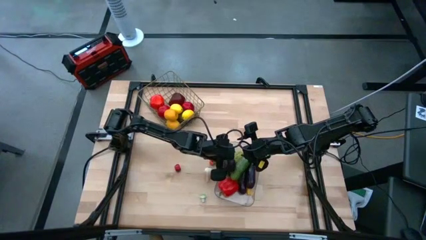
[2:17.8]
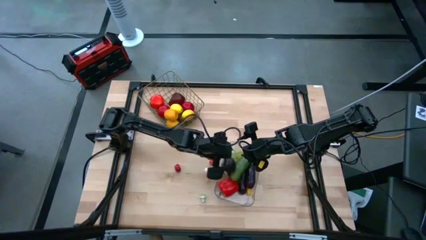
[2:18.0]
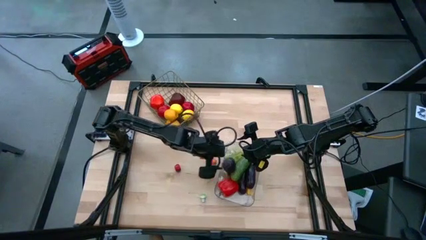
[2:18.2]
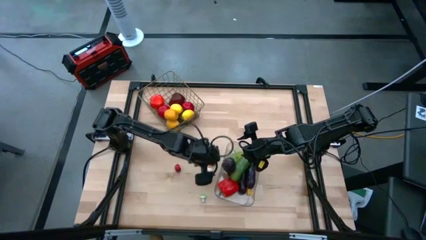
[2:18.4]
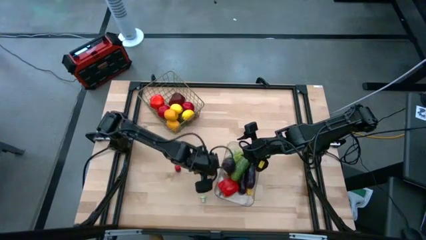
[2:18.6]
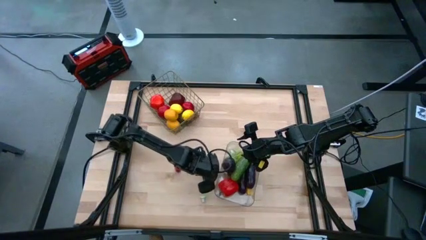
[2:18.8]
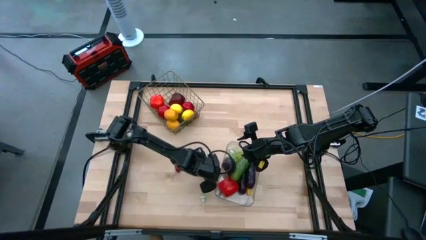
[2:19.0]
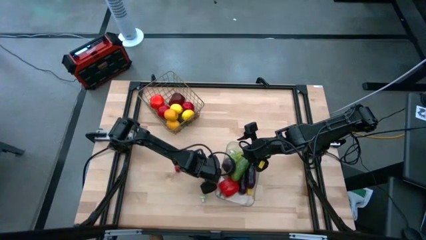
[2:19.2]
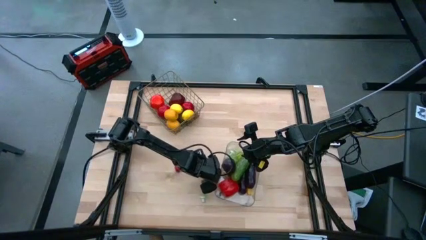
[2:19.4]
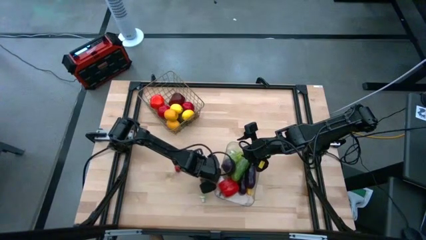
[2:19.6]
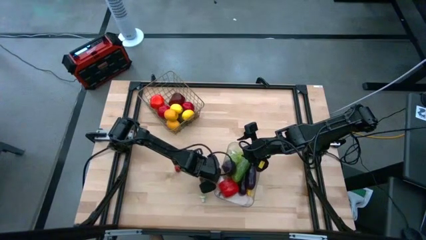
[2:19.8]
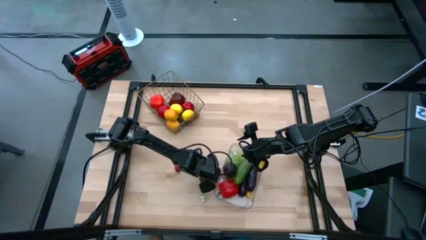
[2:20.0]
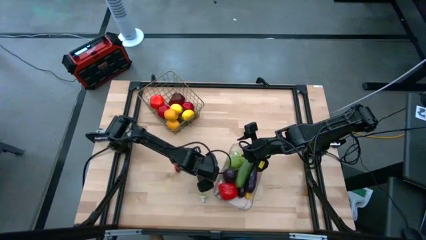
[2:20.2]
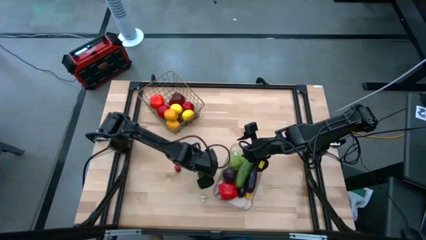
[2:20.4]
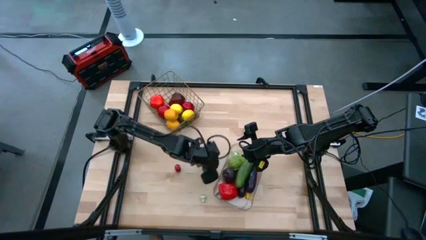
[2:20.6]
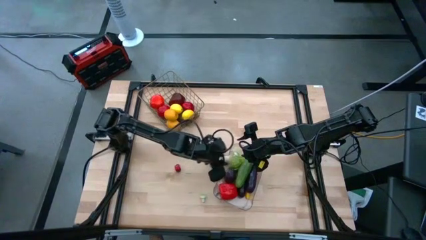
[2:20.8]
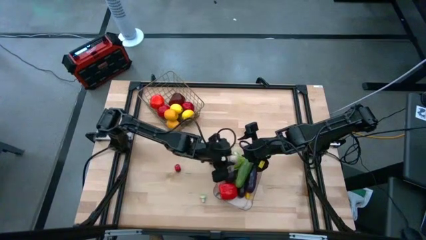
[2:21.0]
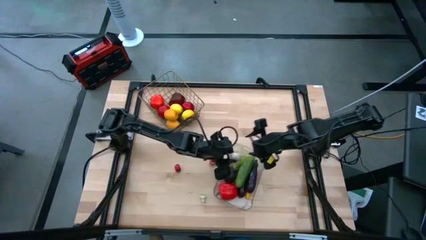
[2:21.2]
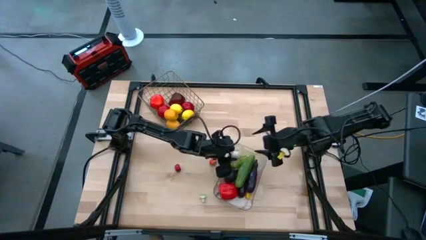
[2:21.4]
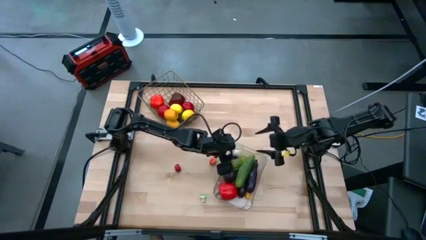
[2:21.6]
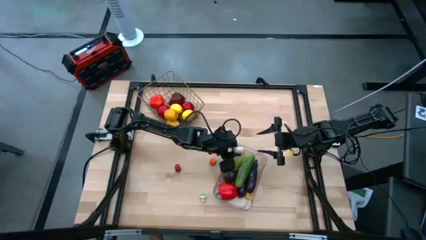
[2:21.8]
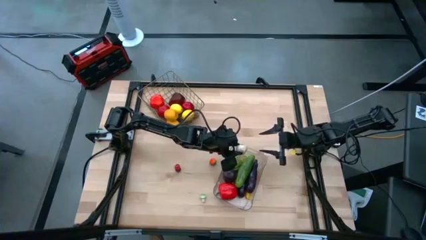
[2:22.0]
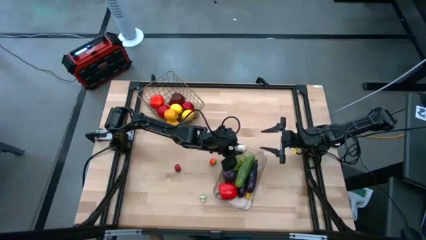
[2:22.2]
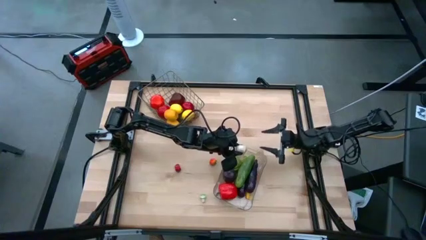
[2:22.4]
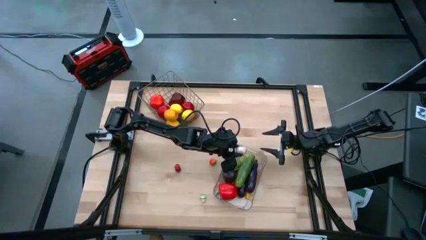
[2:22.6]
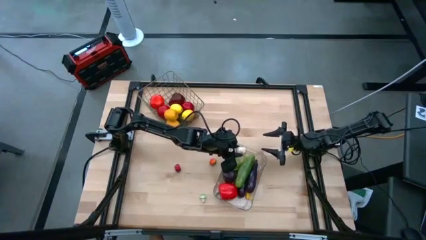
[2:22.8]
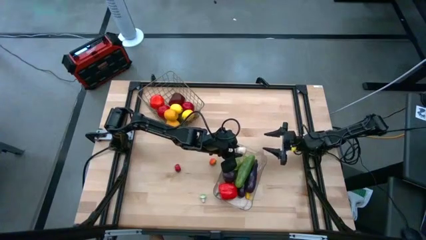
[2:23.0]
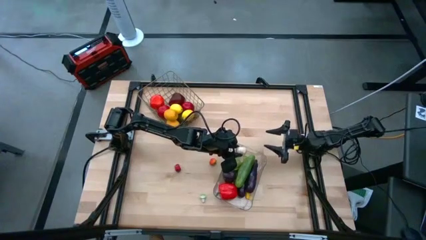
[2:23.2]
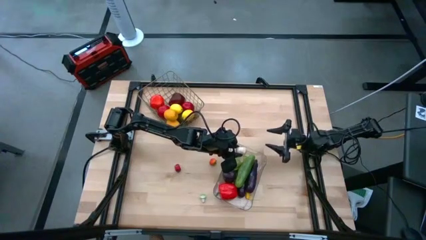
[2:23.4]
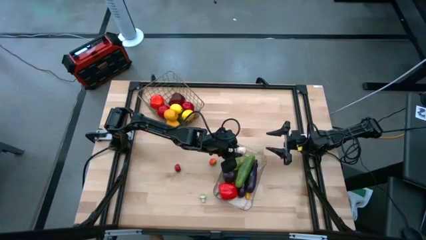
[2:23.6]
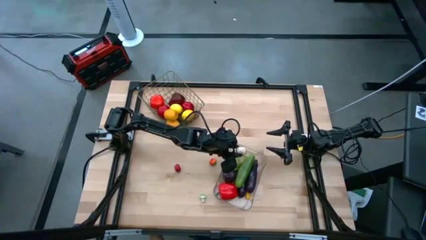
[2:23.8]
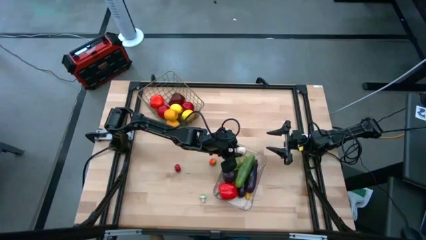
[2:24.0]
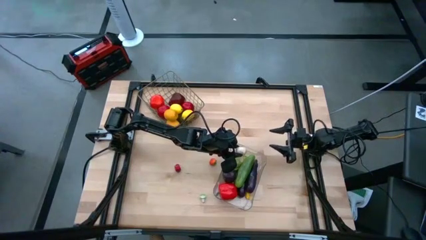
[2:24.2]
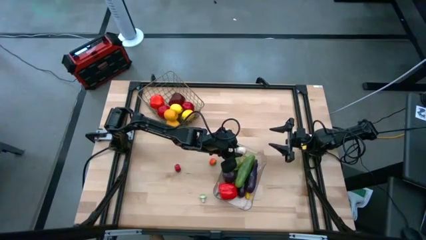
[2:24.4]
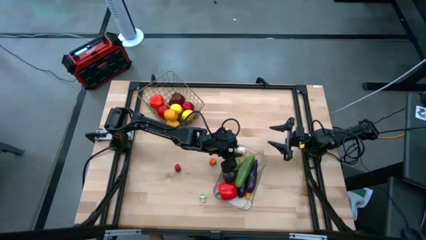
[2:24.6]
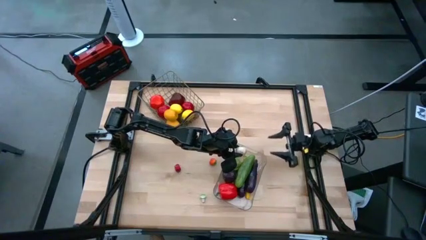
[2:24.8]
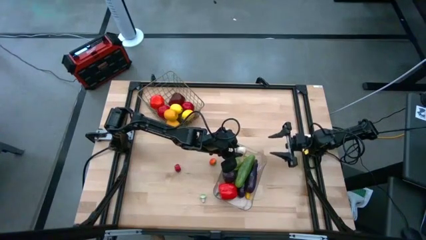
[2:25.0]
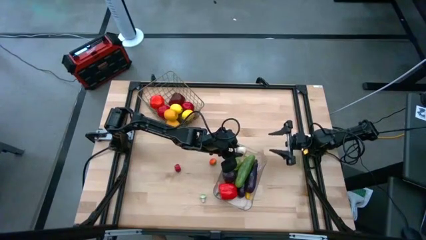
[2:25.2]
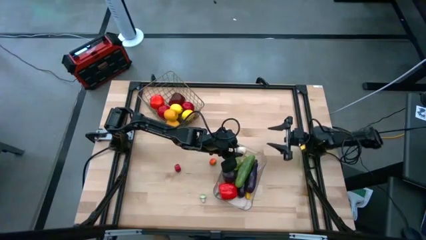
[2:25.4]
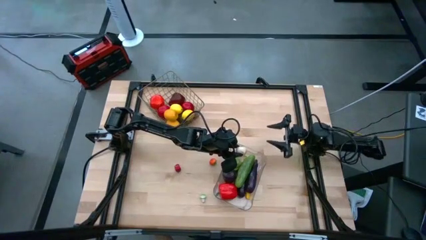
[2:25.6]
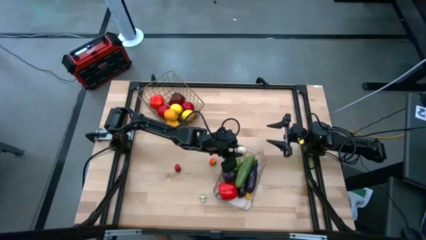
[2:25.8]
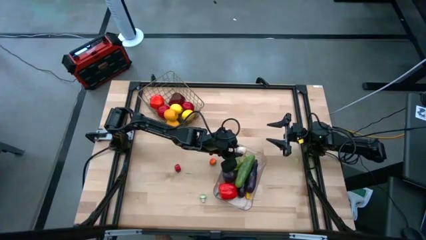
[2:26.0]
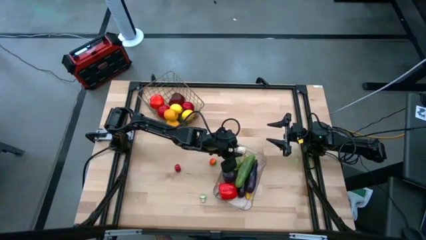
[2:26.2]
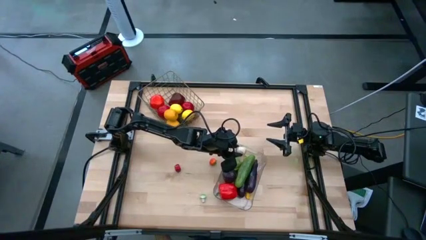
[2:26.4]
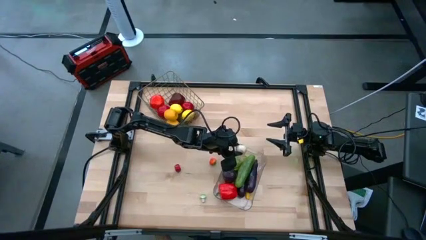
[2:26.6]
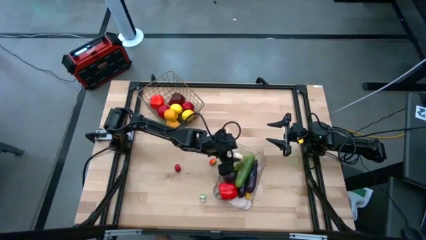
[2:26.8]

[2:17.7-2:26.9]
Task: Sort produce into baskets
Put the white garlic into the transparent bin

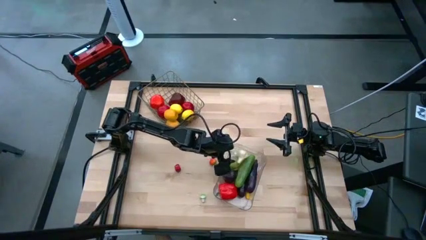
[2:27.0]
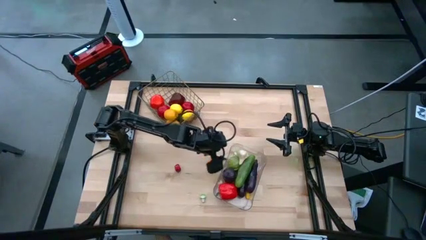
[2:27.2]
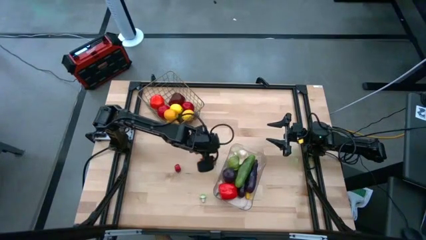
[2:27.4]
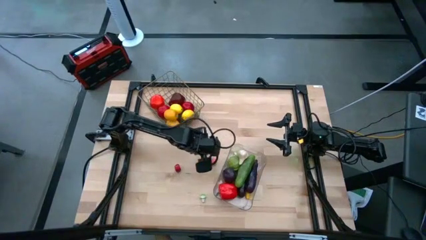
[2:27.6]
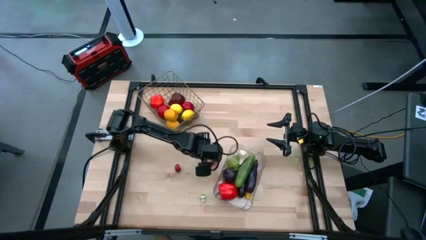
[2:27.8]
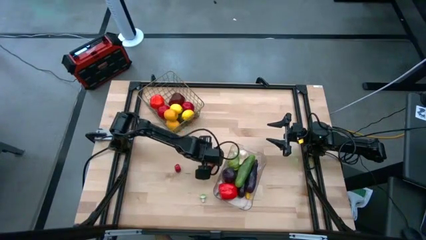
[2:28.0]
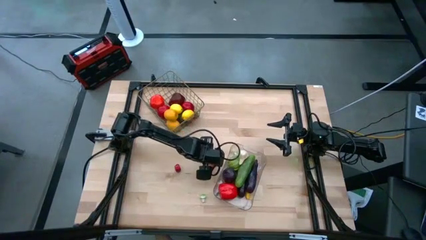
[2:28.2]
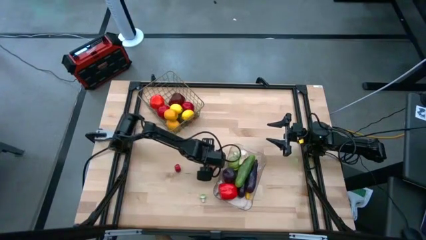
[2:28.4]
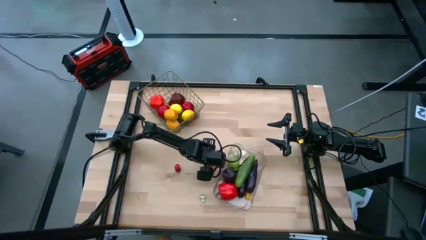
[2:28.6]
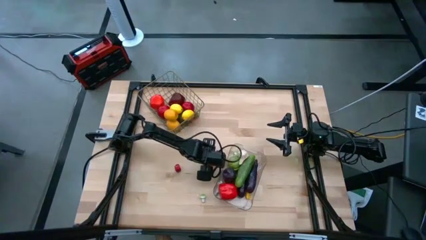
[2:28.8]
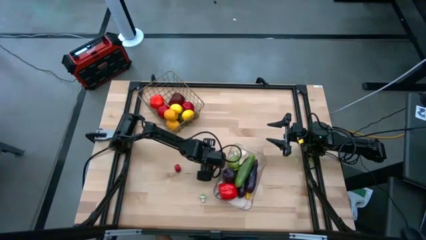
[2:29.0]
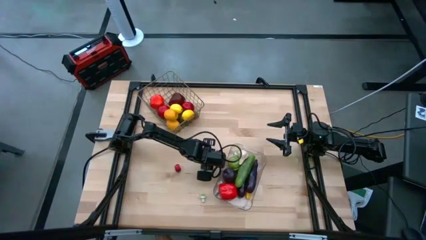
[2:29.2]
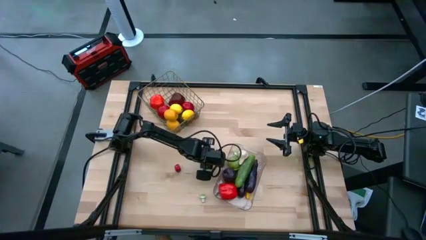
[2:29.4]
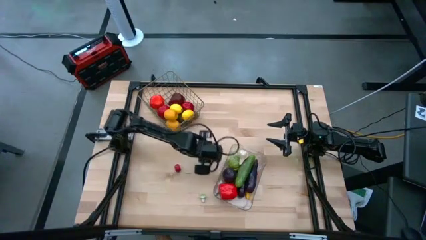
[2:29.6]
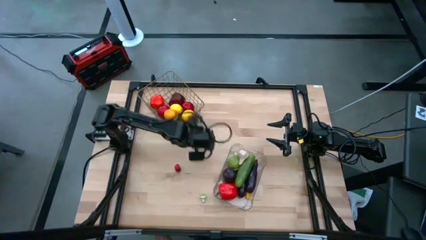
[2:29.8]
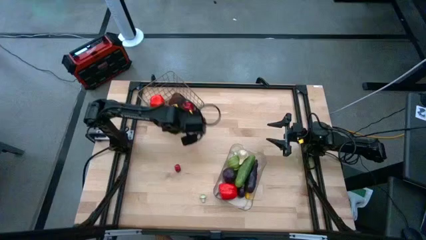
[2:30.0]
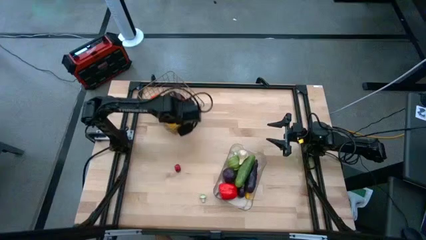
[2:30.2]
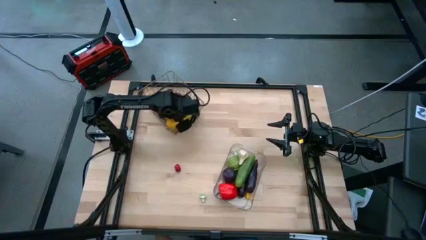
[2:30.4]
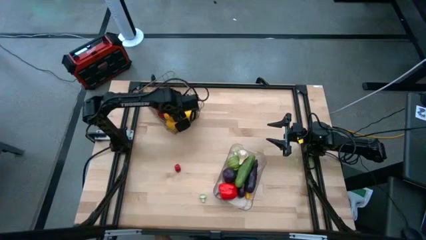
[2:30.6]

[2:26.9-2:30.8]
Put the peach into the wire basket

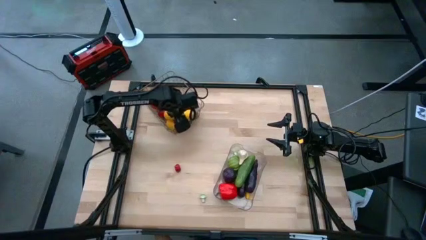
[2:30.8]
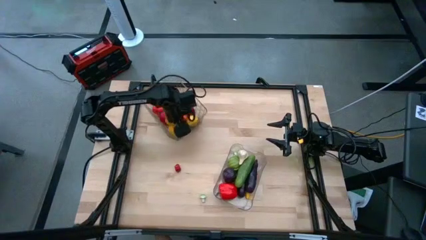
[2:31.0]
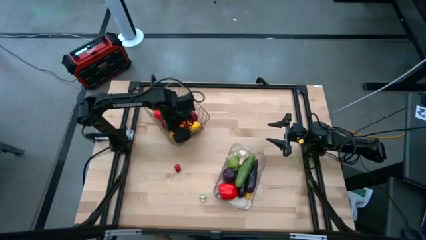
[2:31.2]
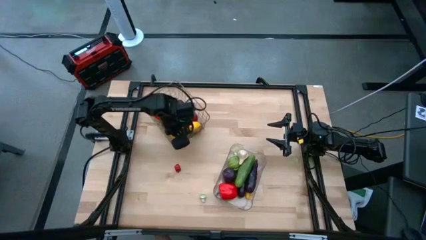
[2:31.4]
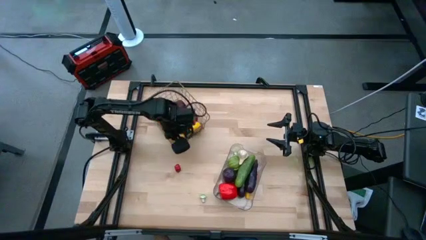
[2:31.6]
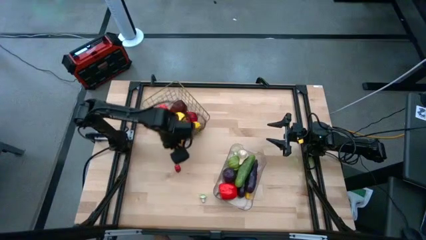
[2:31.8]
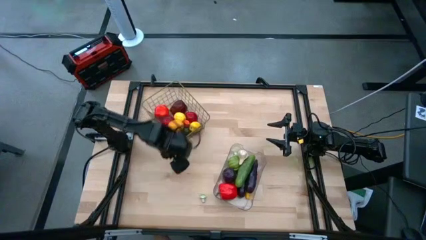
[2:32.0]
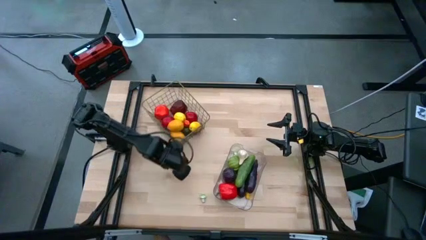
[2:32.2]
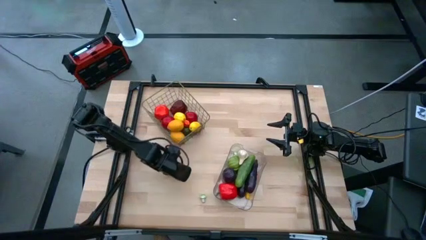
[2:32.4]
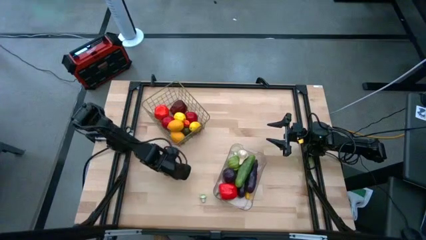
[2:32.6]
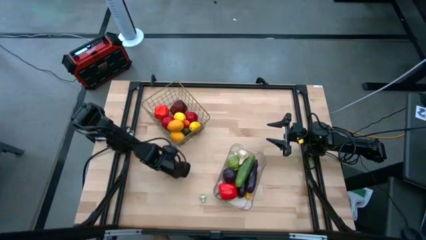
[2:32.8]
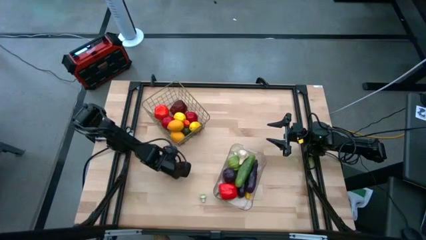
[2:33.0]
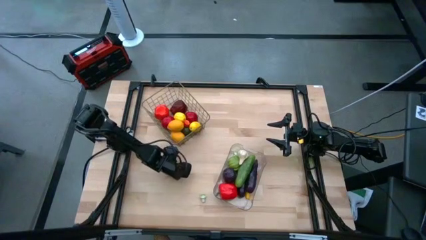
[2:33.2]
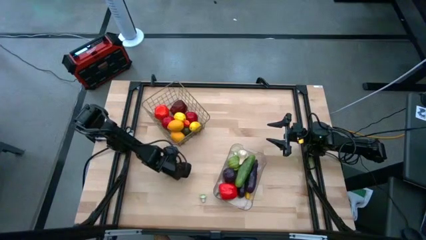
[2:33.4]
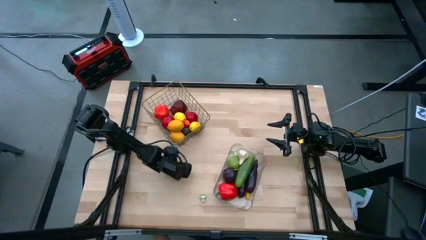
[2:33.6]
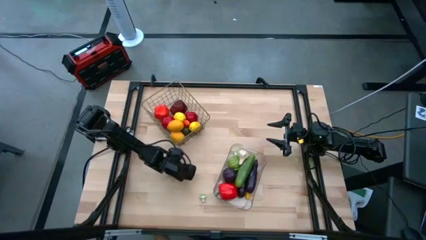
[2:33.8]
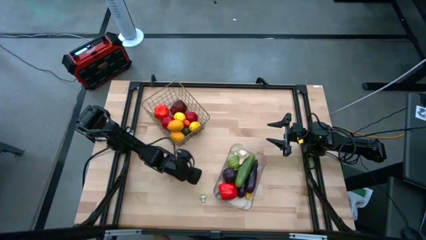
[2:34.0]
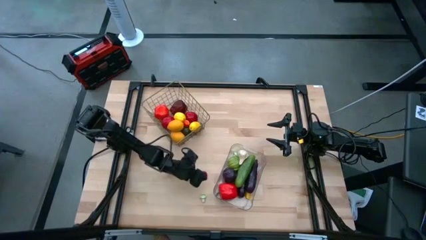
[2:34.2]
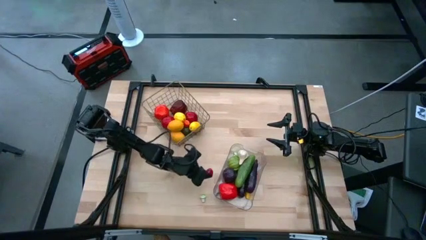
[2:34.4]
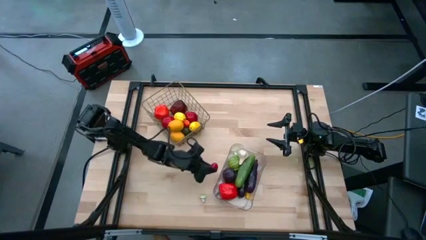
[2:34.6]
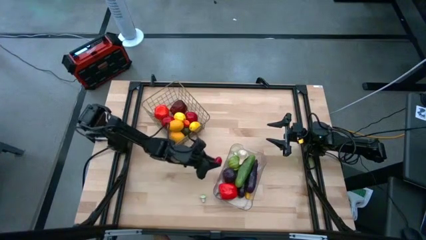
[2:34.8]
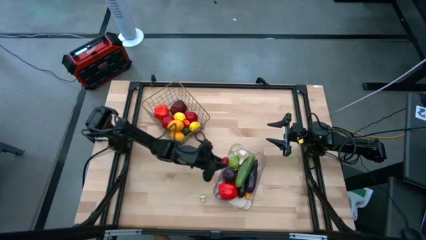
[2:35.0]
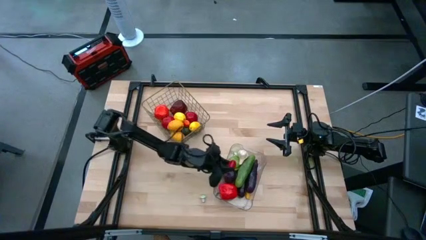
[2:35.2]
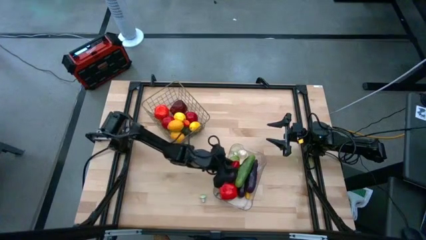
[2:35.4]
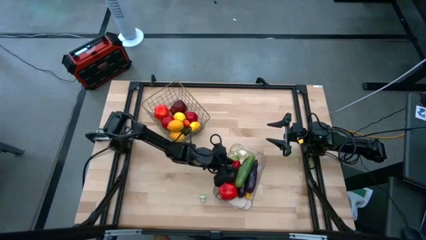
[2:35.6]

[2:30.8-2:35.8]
Put the red chili pepper into the transparent bin
